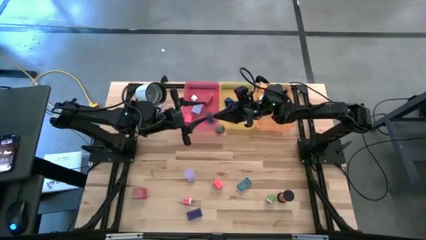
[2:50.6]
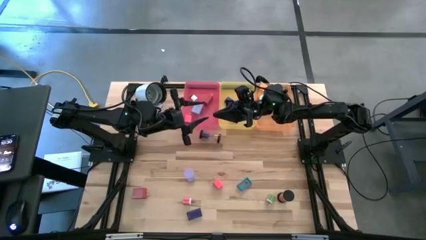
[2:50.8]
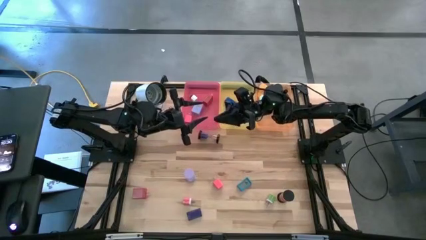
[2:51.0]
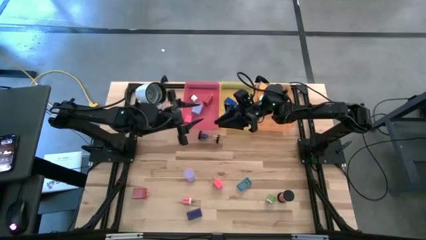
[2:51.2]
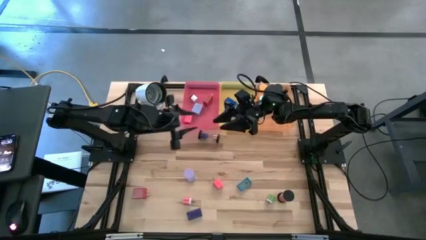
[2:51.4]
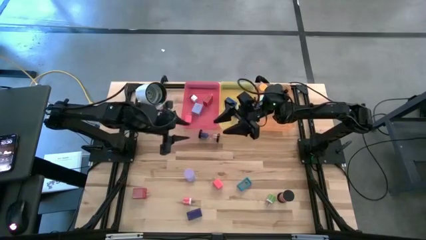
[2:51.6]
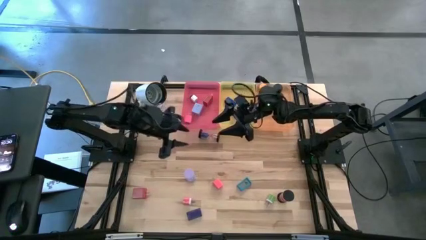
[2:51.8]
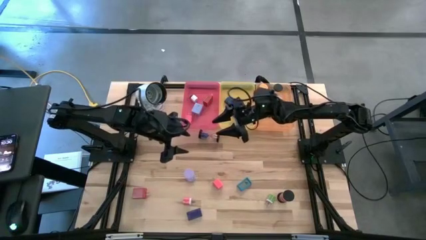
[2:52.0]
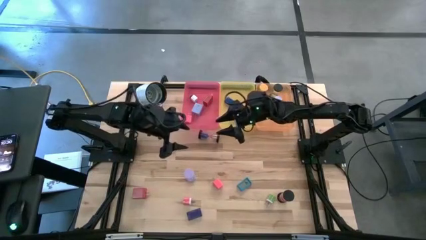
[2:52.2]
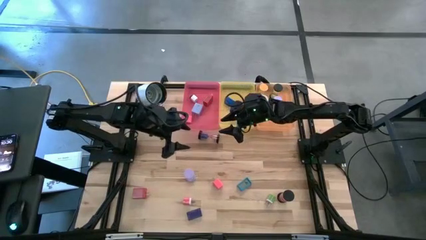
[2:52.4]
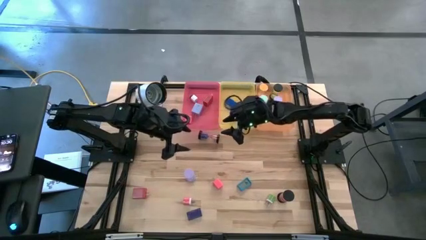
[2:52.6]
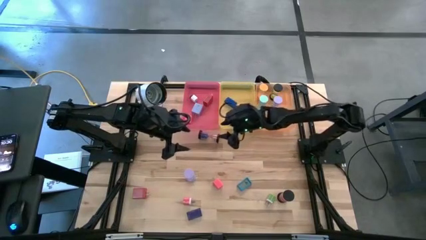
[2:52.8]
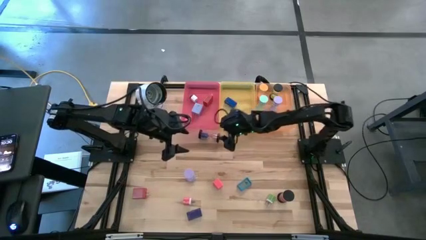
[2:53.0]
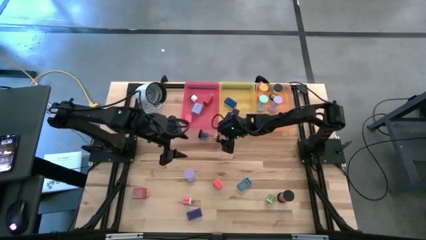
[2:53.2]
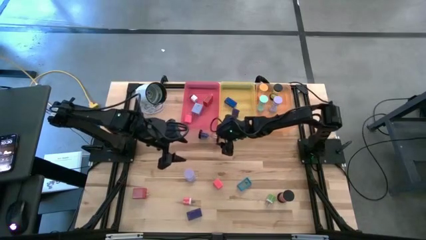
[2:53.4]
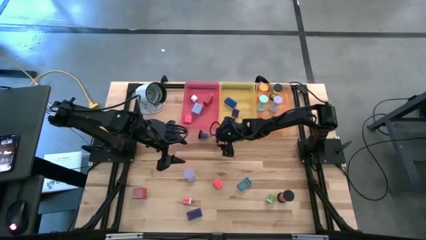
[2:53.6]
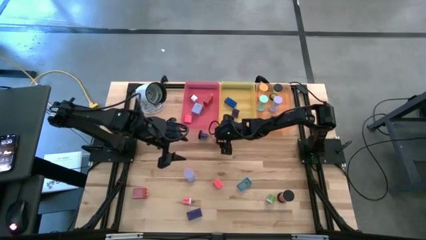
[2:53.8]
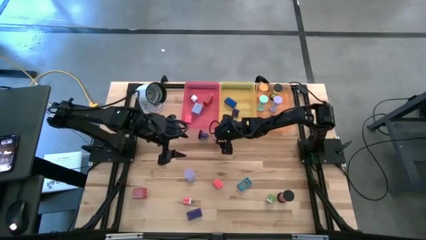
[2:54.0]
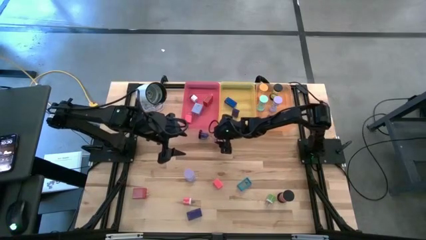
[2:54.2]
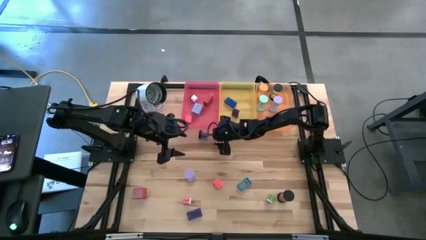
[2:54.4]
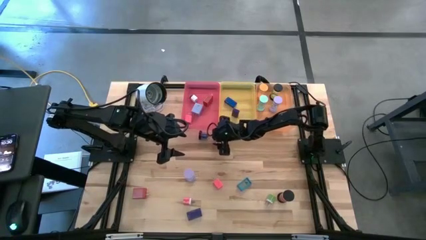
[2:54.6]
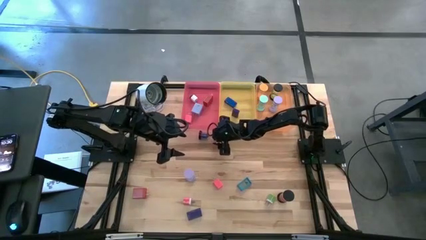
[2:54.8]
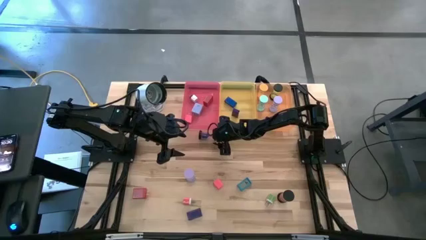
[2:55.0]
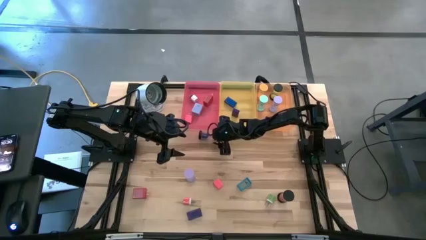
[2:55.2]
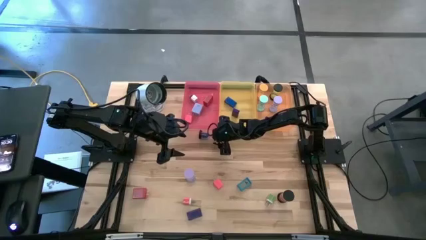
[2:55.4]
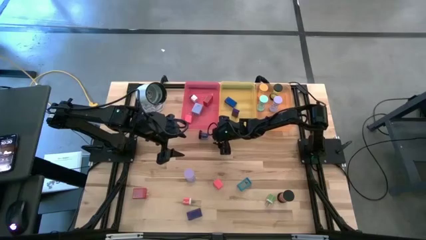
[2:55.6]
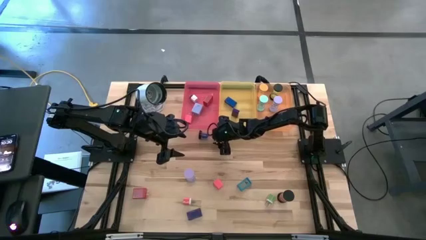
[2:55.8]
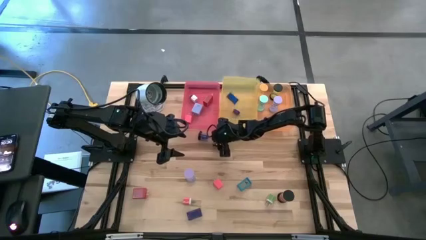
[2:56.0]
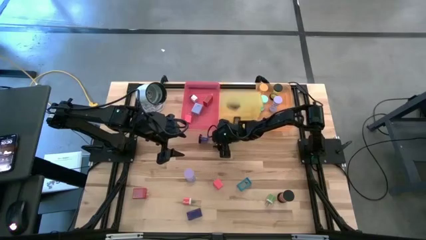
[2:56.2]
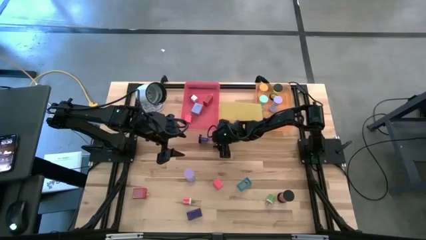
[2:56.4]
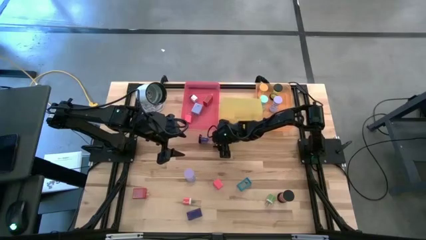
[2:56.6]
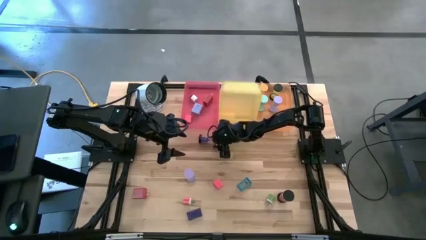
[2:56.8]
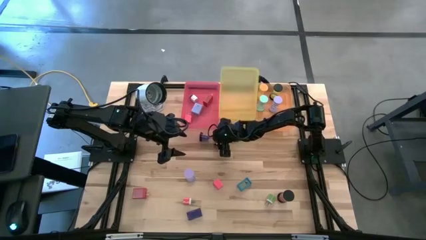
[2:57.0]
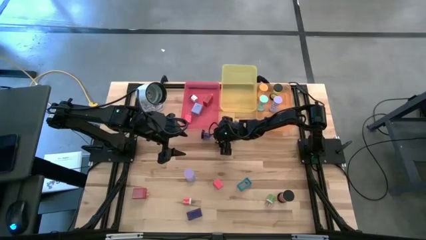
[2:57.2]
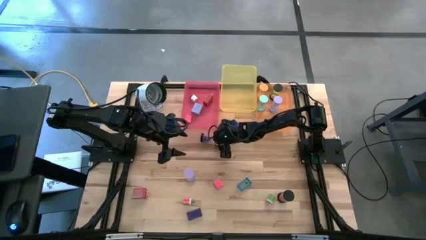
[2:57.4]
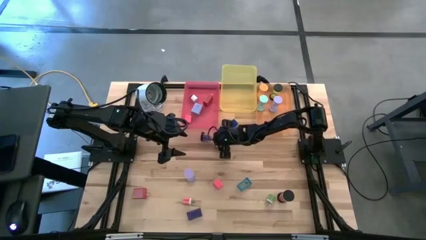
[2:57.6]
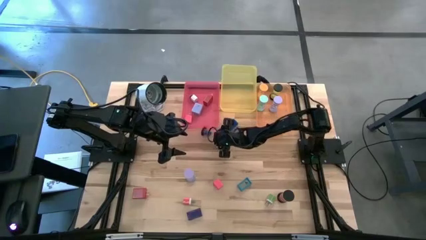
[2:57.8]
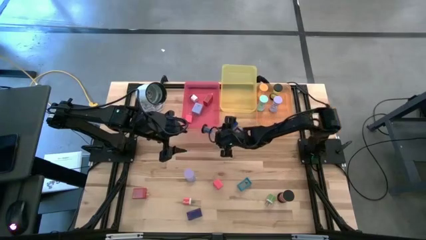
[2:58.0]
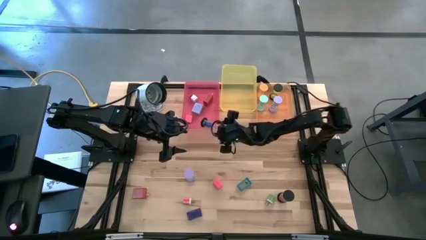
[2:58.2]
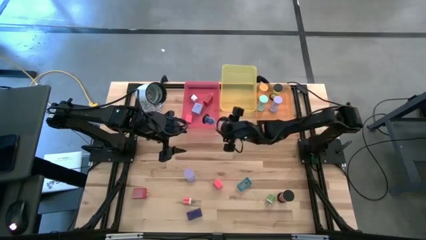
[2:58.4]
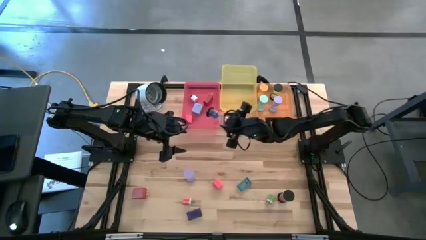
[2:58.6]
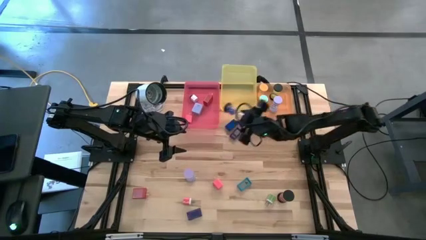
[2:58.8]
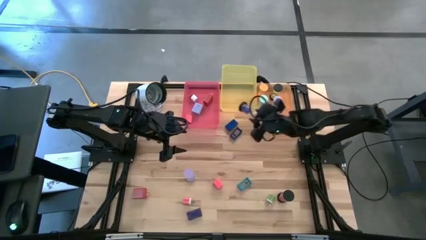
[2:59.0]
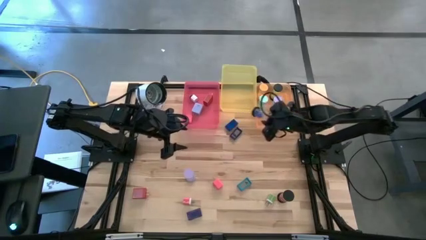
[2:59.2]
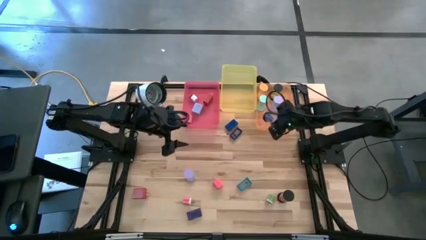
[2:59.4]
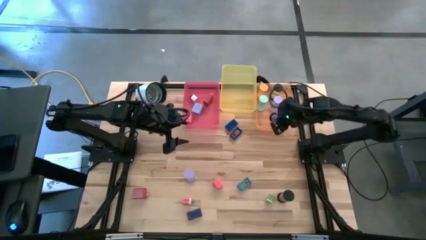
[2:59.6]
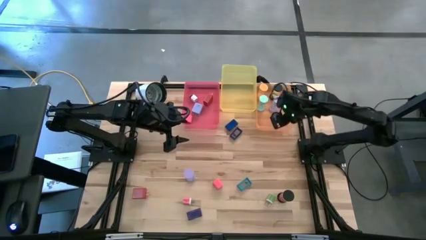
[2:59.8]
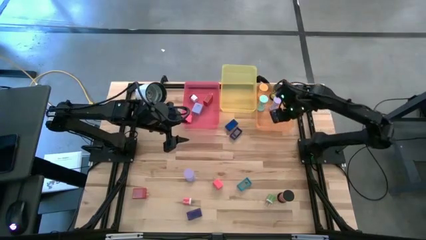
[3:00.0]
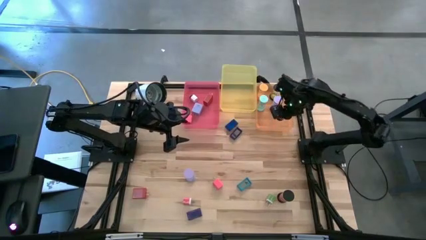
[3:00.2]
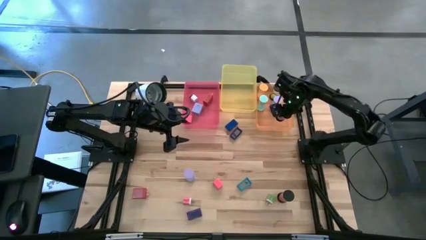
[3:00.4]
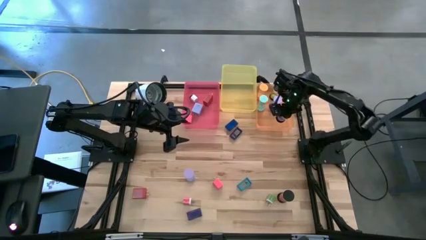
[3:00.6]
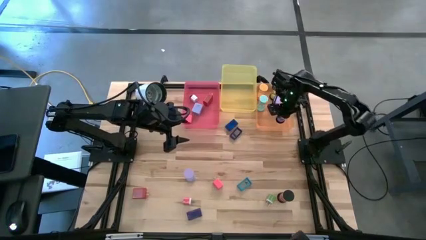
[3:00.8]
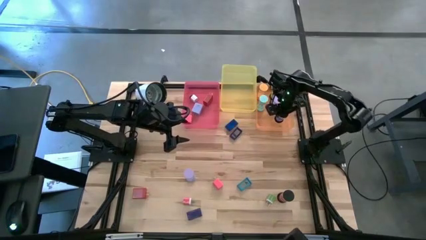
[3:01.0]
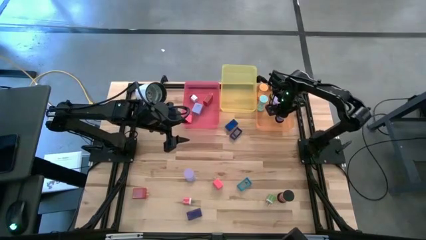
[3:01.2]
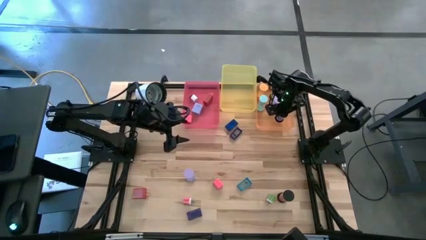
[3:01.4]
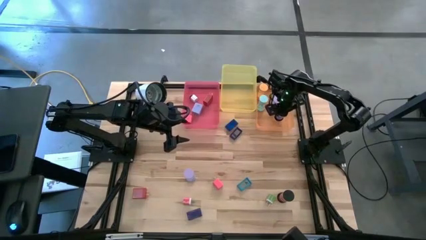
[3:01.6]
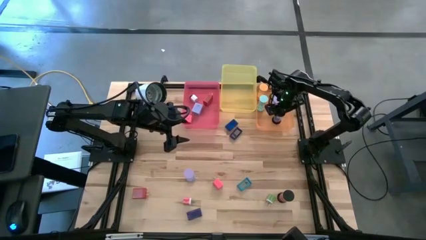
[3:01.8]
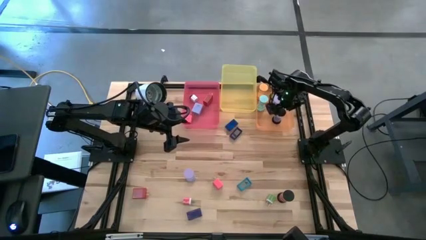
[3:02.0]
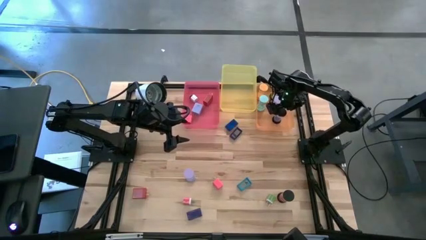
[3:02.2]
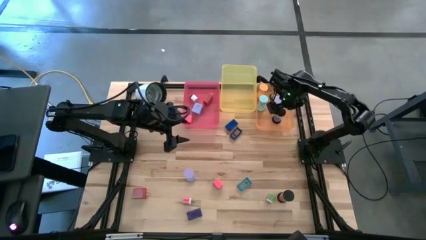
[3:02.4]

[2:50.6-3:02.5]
Task: Pick & Place Office items
Put the black blue hourglass into the orange bin

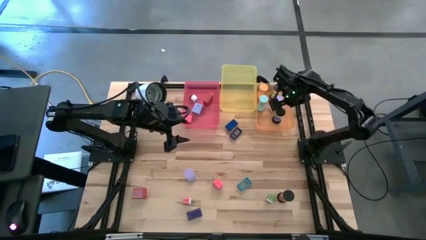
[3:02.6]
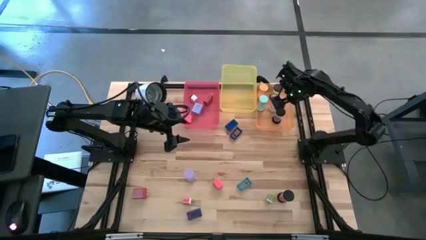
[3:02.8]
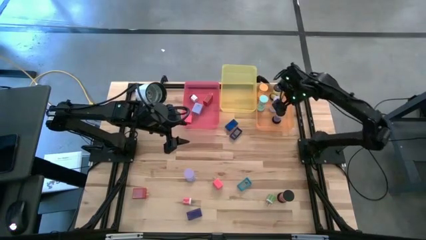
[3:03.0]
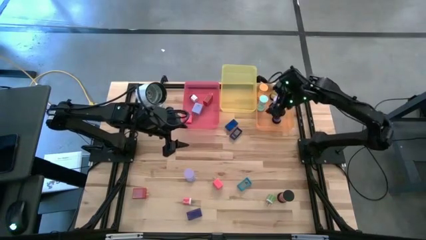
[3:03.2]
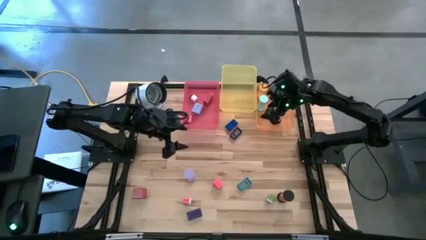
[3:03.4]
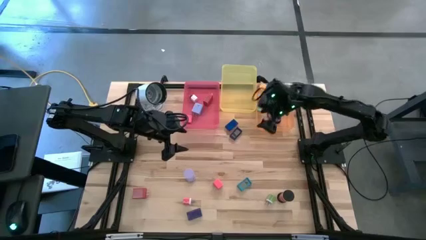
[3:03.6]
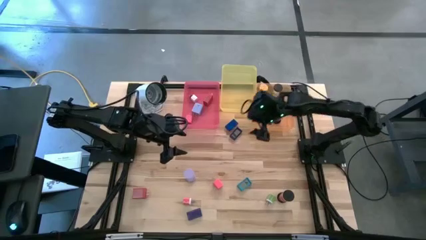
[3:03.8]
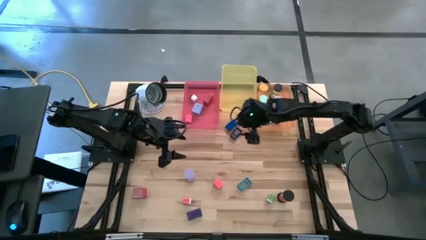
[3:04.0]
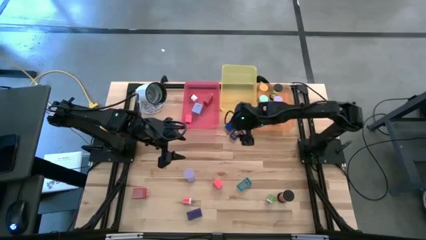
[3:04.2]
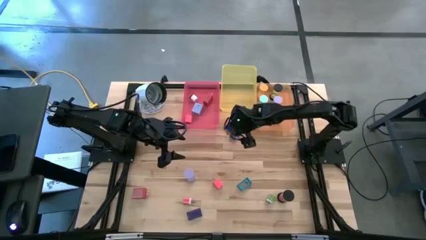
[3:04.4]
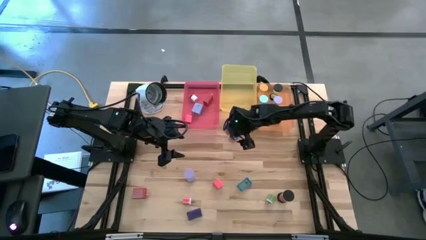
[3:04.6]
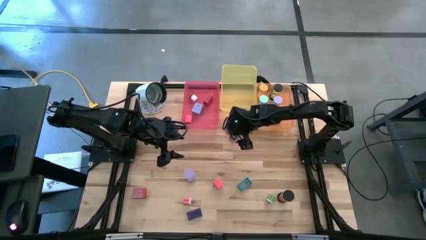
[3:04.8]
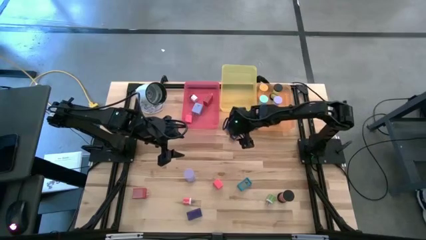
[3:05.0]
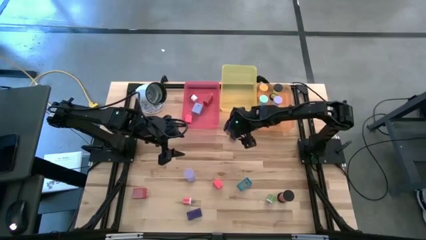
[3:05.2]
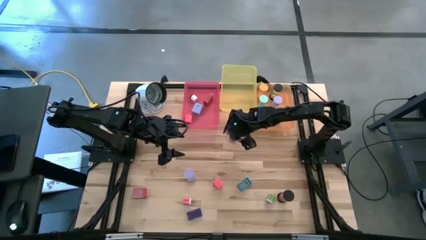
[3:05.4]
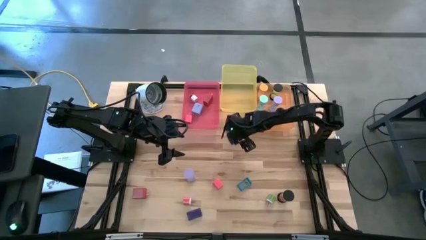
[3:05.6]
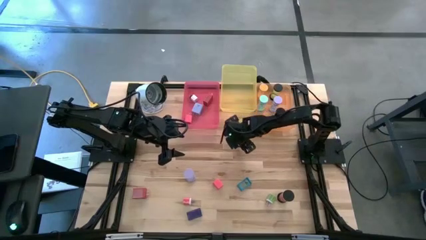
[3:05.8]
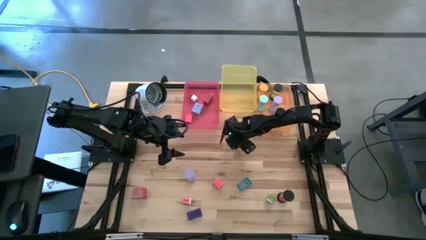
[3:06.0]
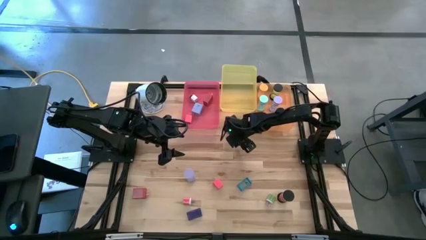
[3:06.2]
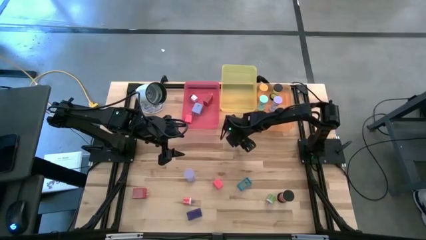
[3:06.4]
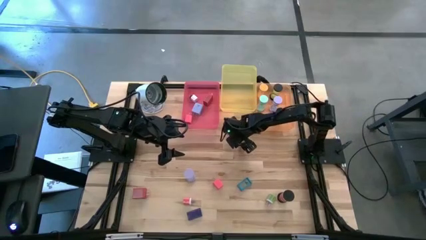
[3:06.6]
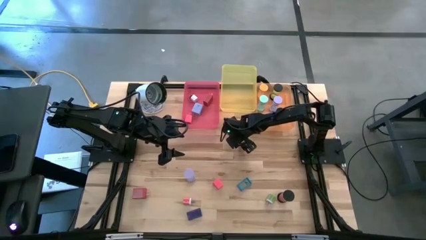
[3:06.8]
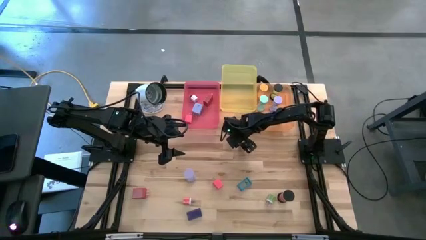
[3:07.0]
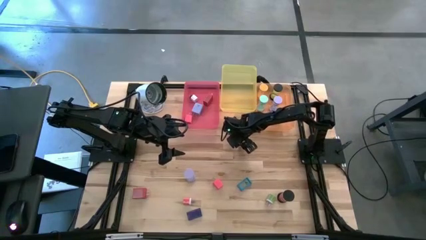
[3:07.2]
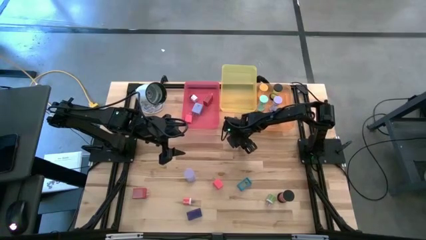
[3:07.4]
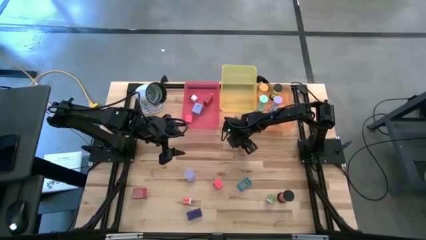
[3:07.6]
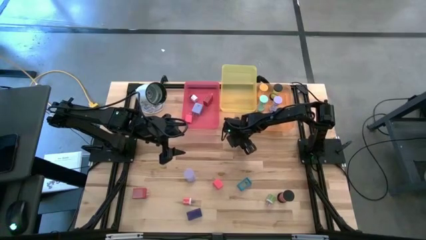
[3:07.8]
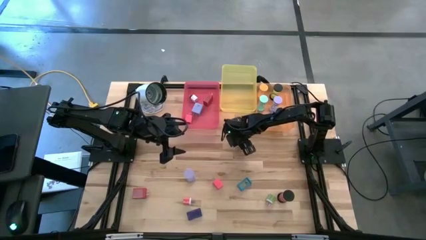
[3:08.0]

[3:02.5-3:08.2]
Put the top purple digital clock into the yellow bin
